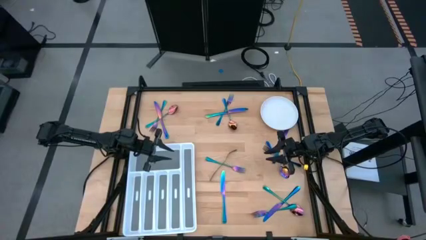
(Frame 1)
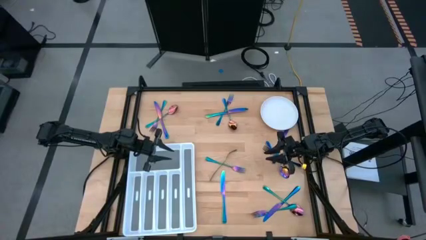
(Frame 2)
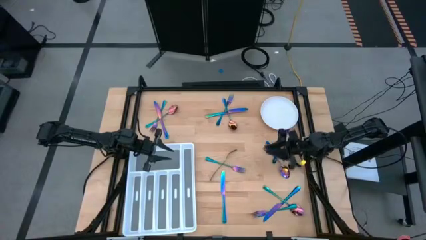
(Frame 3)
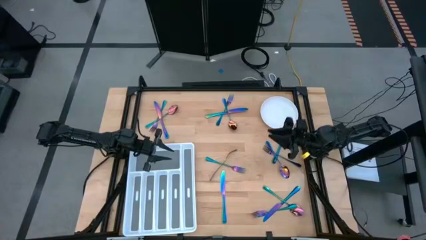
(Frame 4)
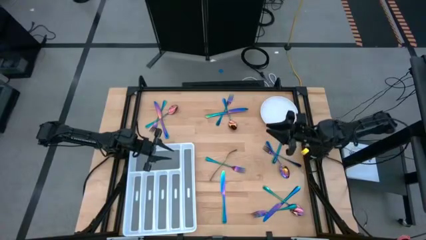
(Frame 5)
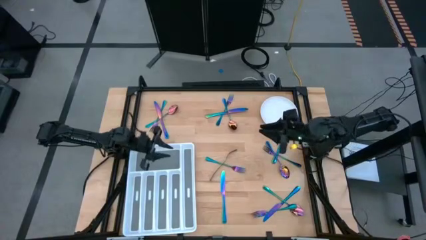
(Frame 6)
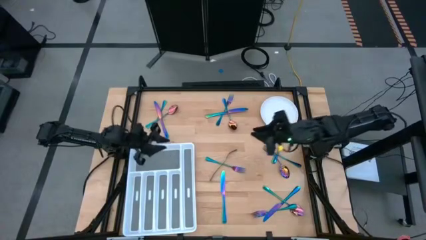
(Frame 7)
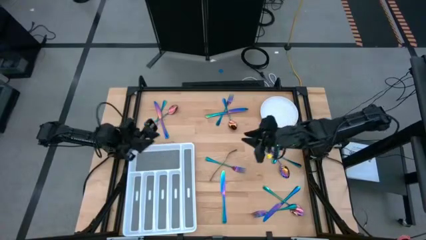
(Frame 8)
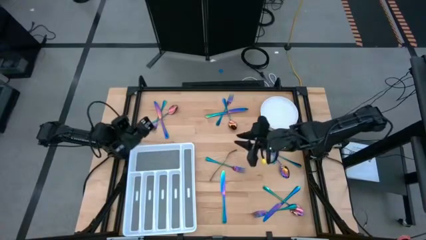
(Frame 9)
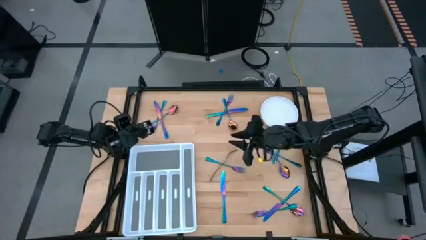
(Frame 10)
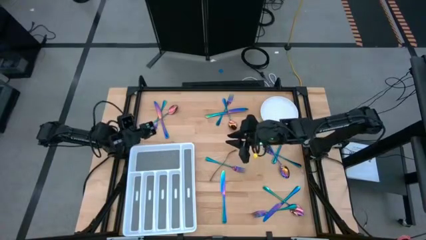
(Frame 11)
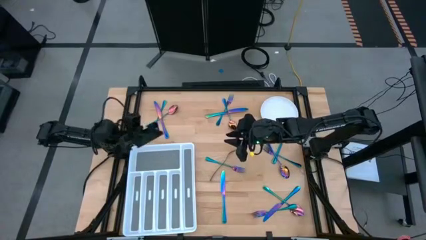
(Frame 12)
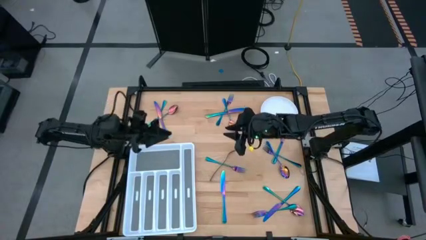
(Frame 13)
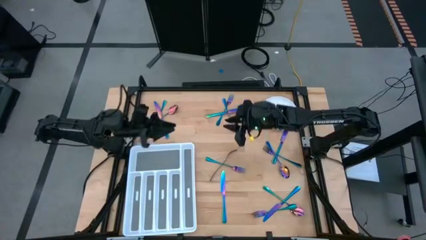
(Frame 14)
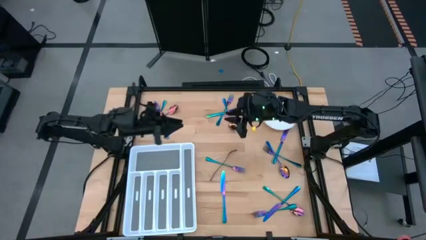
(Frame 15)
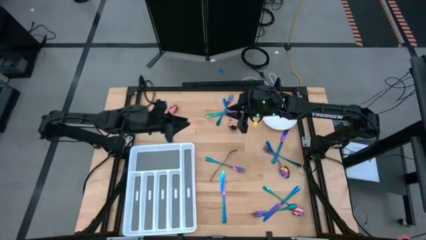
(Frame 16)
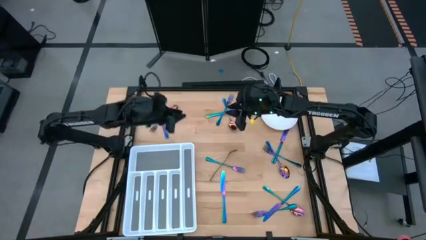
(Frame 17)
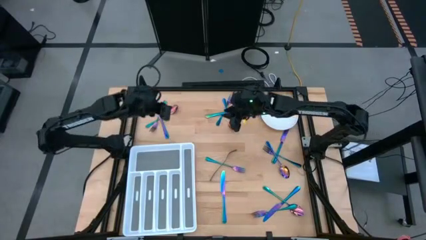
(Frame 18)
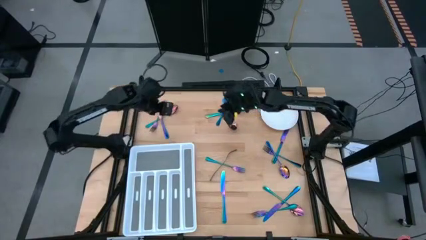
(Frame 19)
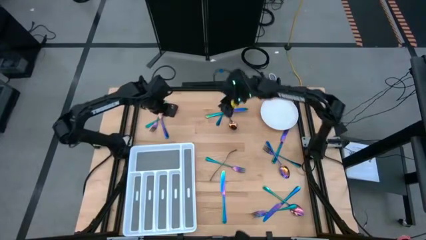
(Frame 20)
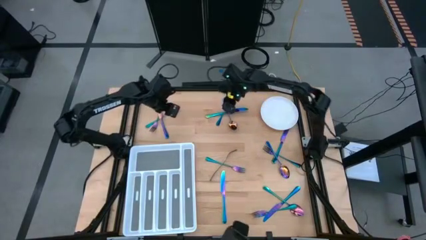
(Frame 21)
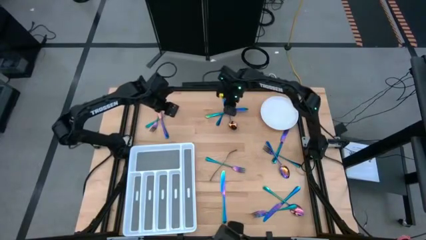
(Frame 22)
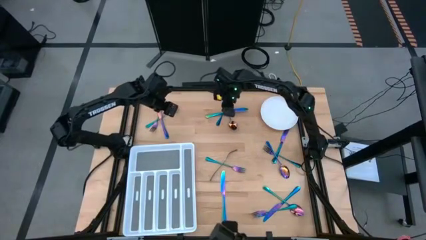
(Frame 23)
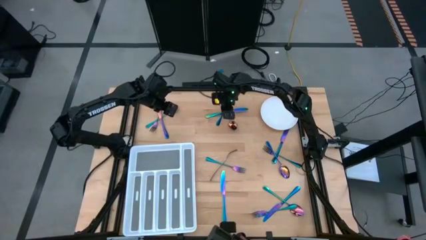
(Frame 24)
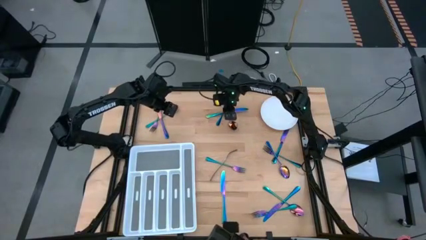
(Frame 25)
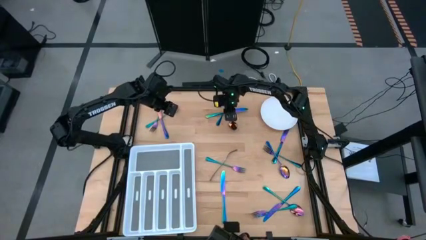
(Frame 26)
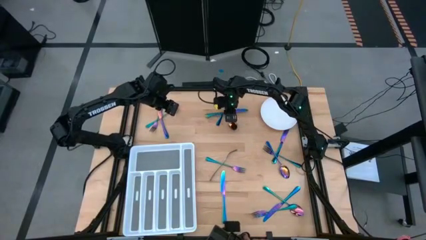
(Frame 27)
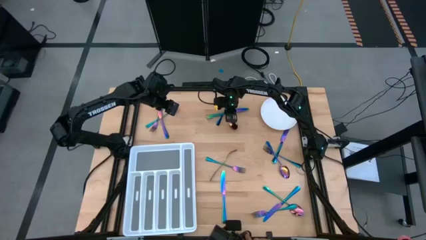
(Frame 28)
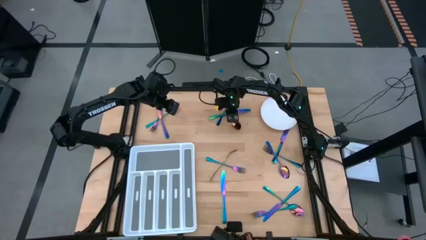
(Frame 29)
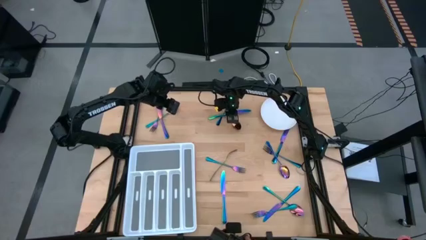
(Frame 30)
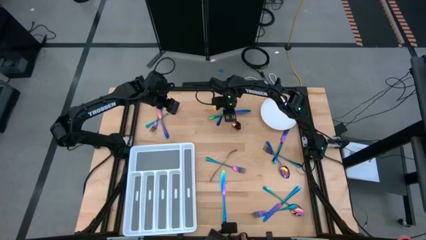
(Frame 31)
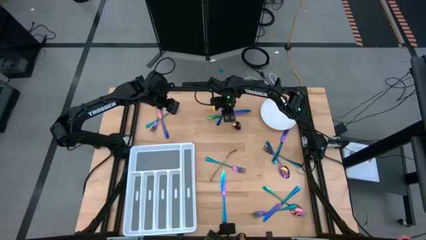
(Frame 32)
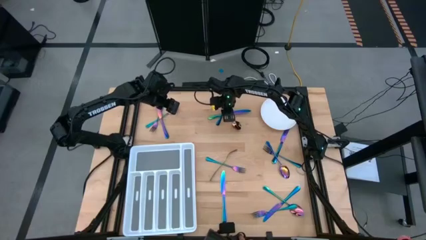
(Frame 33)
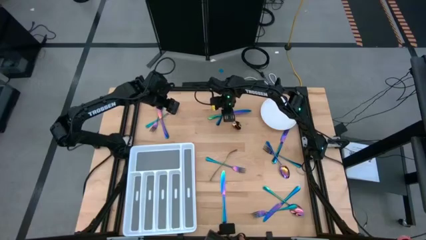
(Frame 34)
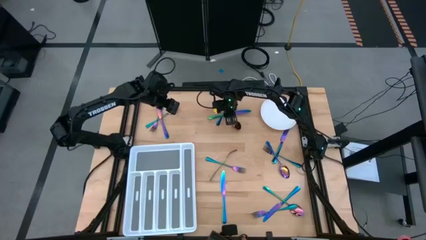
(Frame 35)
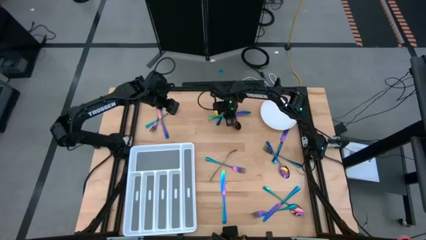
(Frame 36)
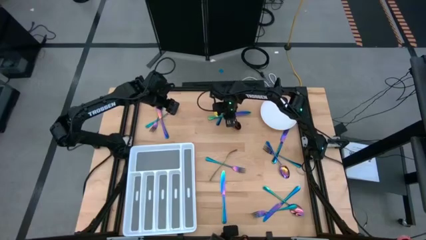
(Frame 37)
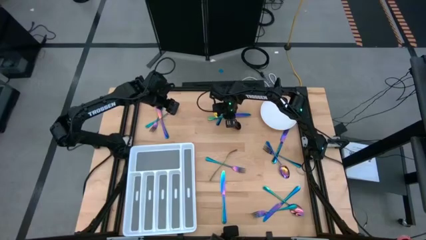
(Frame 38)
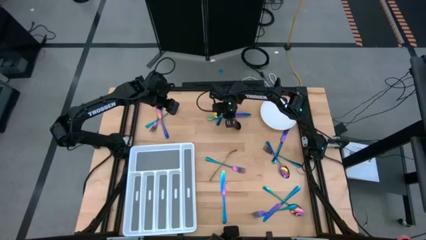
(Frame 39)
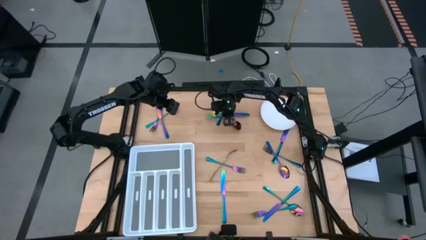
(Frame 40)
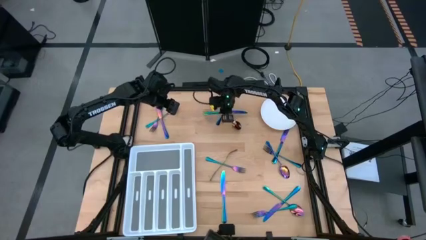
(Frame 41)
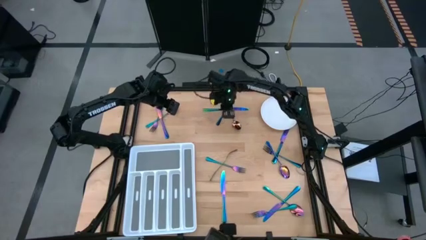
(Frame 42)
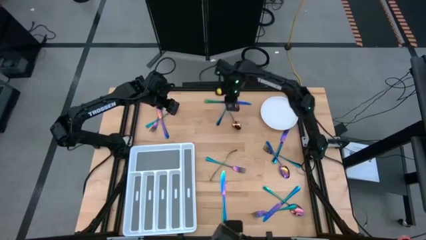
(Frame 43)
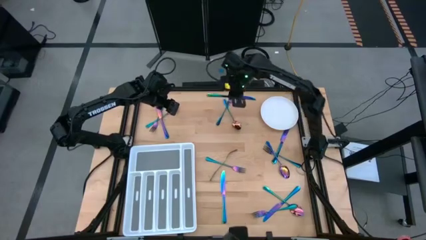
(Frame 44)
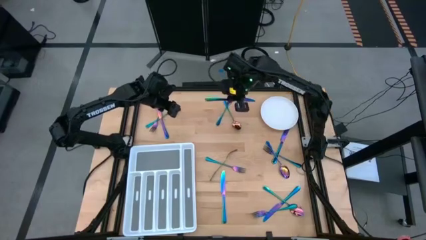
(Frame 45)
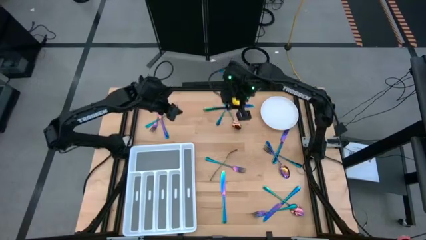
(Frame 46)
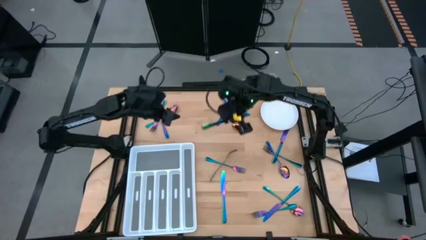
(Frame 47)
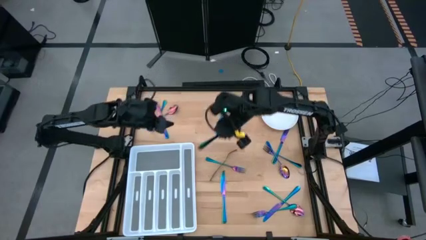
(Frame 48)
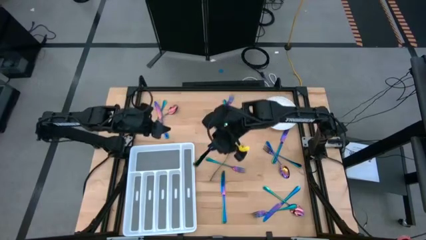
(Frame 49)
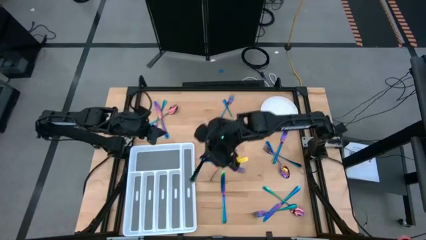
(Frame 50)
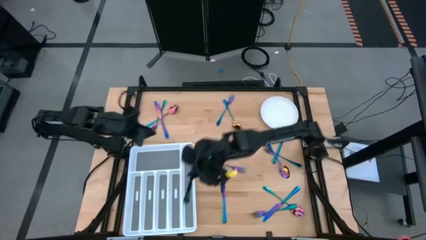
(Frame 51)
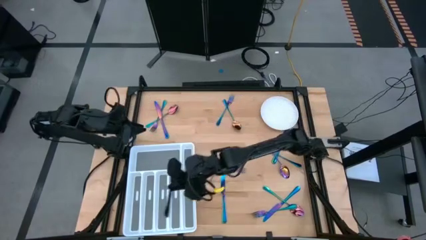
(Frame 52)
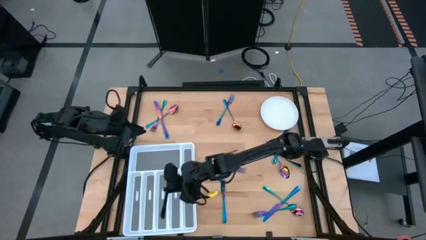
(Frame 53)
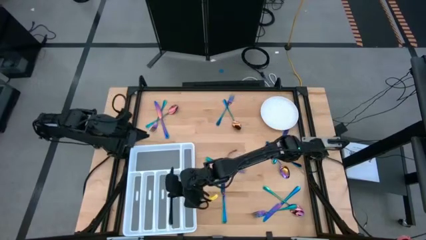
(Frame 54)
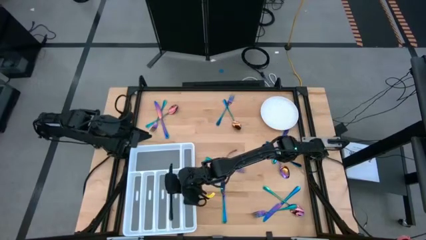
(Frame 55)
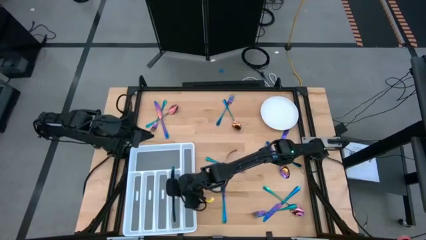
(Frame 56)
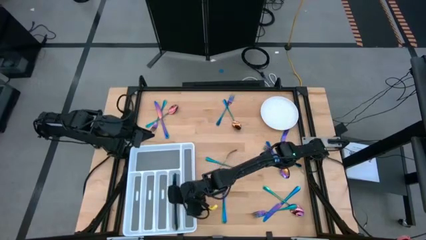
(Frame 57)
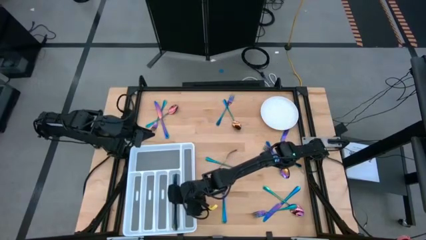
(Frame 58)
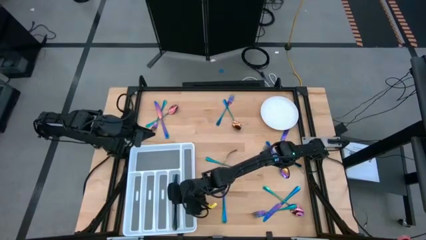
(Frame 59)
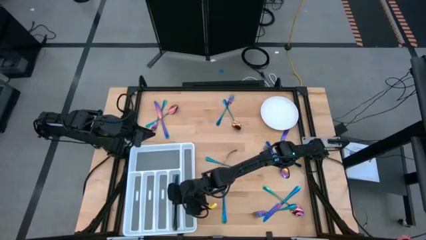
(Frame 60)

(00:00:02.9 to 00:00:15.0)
Task: Sort silverware
Put the top middle iridescent knife into the cutlery tray

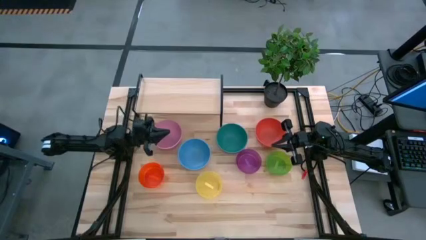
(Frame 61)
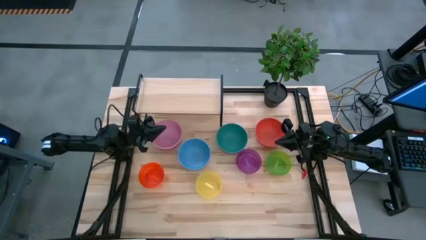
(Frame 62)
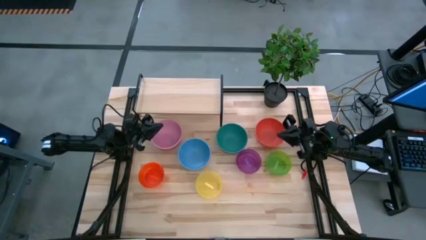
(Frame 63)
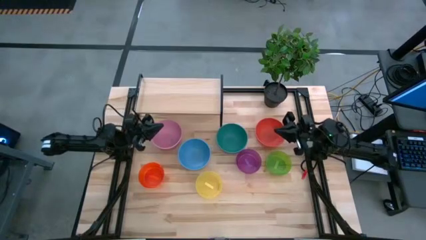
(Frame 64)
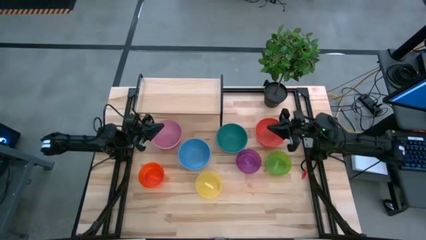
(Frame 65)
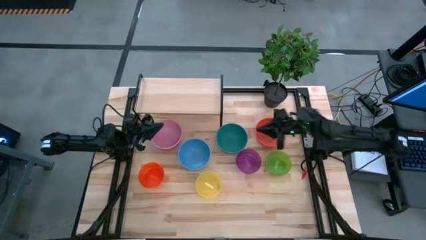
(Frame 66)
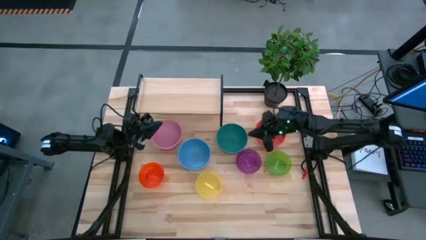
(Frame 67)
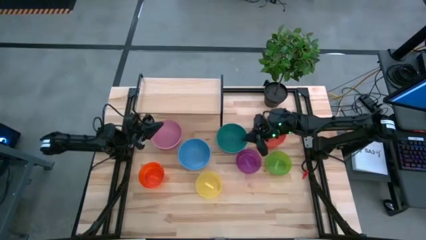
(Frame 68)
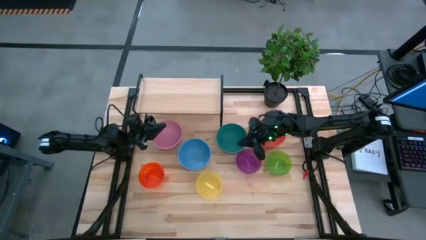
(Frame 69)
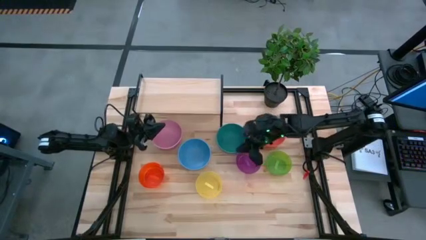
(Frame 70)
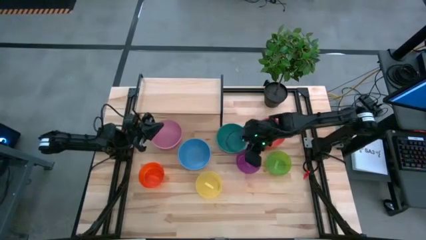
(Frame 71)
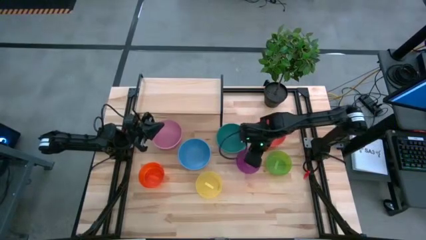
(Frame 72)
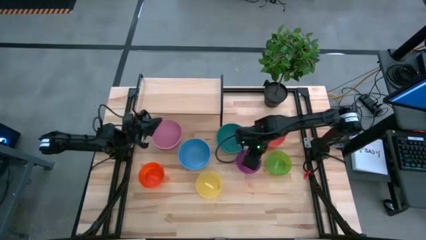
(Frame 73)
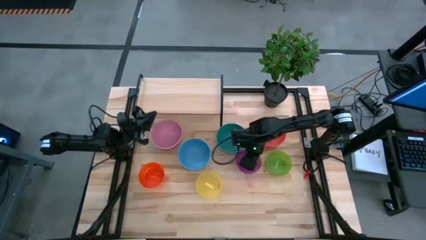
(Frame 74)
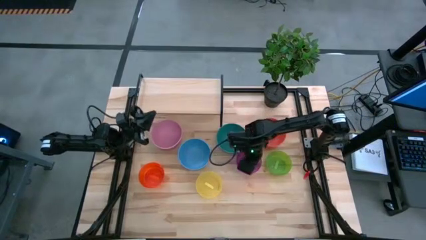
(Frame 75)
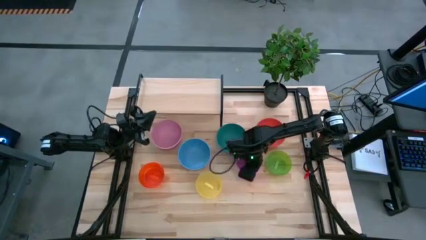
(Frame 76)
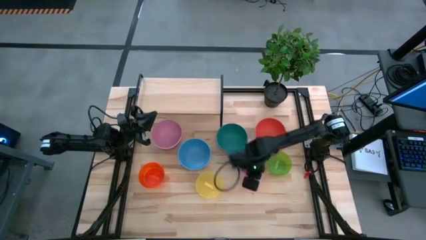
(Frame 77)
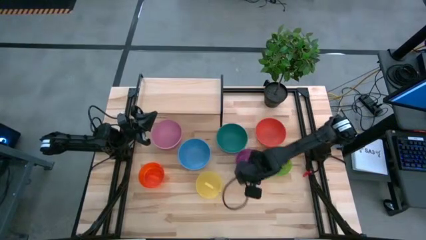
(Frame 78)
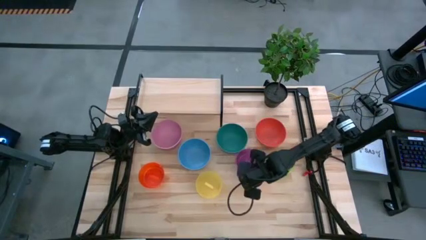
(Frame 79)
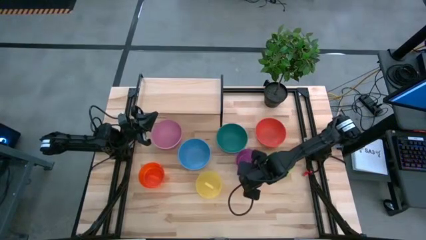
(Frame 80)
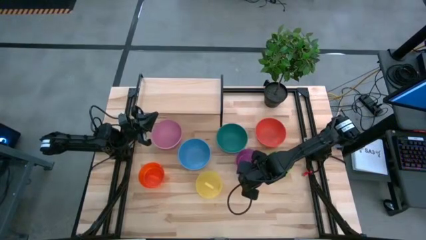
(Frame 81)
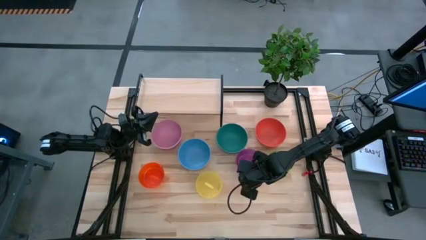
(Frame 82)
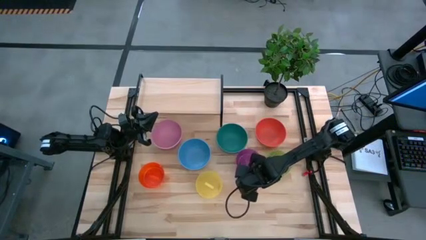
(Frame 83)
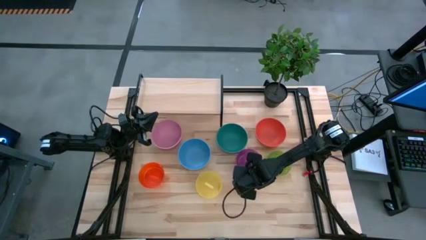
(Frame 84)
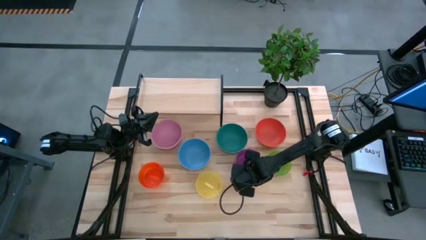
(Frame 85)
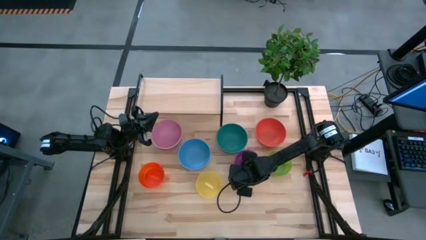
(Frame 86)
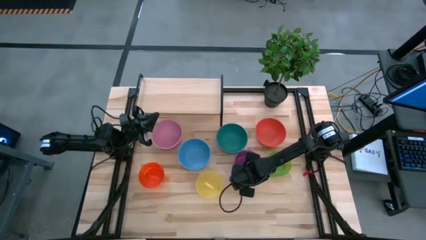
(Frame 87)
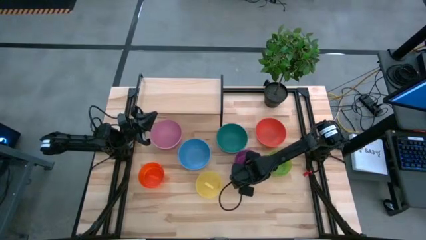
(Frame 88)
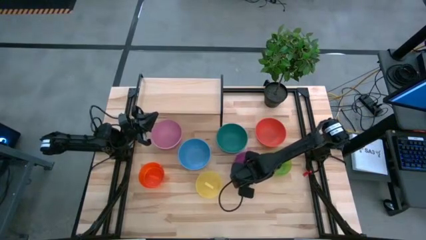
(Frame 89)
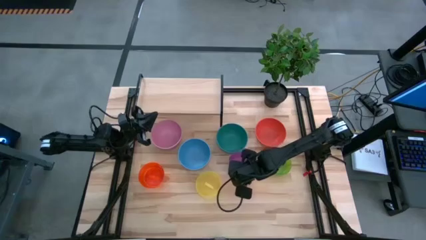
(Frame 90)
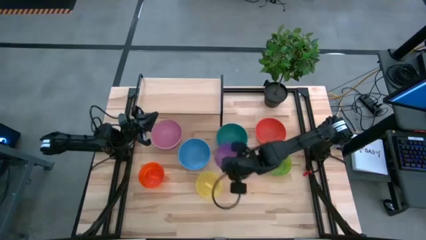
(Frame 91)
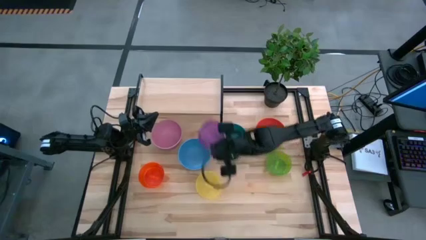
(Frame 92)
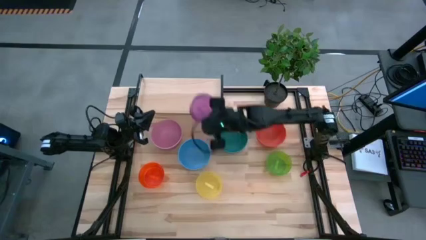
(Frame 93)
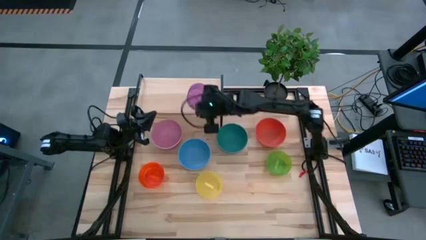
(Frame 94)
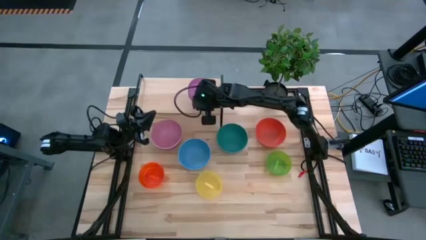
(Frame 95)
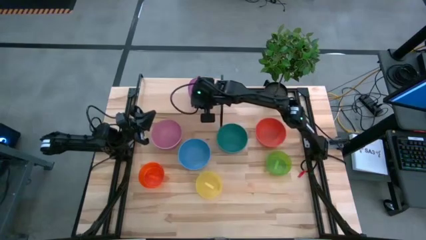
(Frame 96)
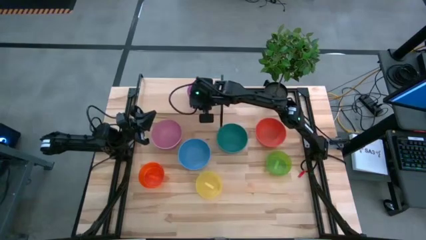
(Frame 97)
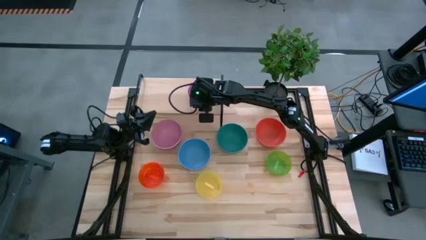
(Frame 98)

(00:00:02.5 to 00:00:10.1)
Task: Place and stack bowls onto a shelf
Put the purple bowl on the shelf
